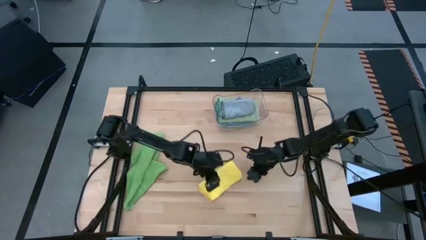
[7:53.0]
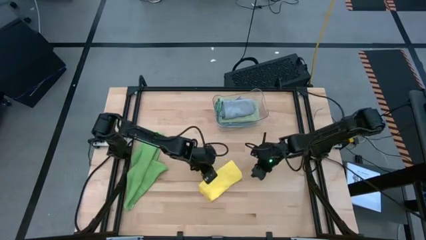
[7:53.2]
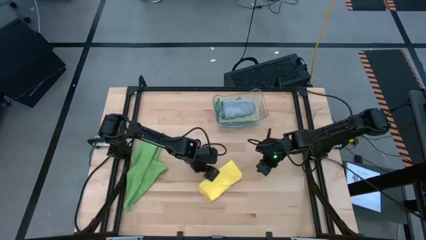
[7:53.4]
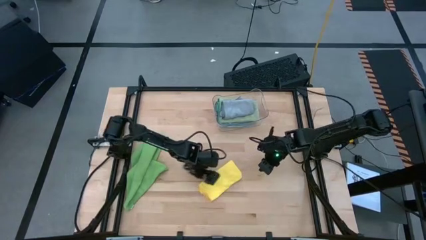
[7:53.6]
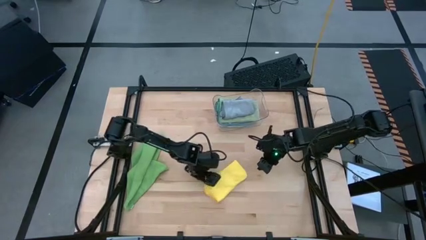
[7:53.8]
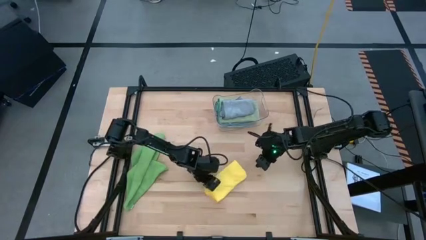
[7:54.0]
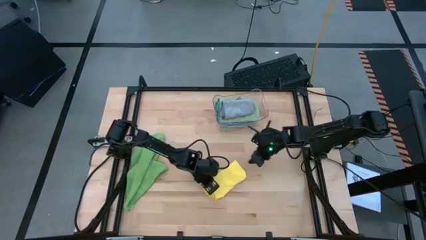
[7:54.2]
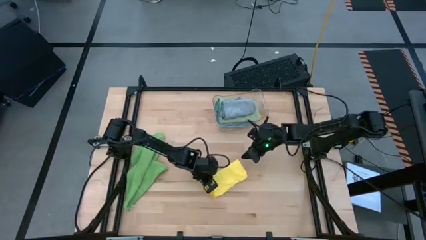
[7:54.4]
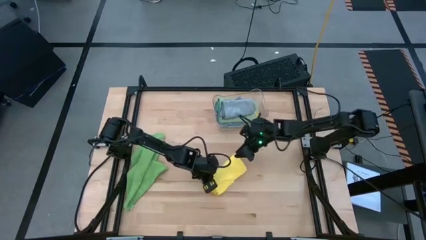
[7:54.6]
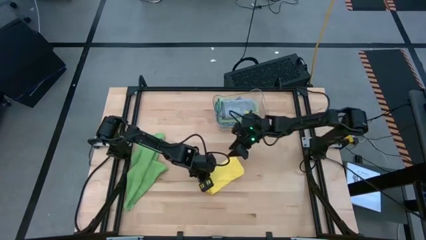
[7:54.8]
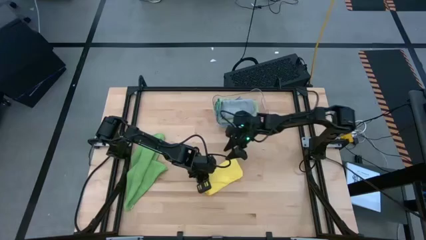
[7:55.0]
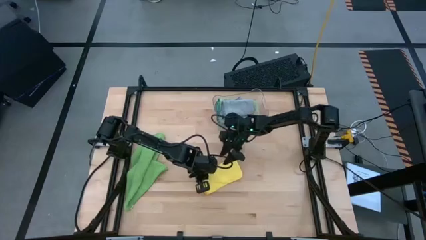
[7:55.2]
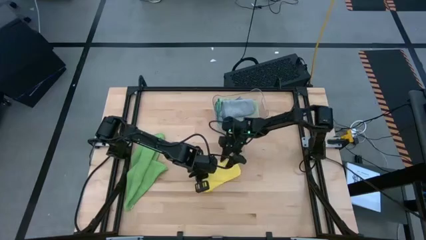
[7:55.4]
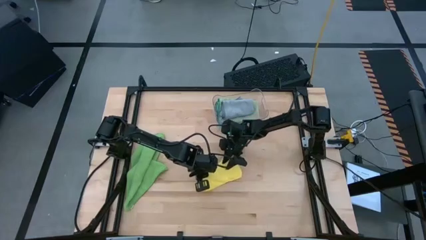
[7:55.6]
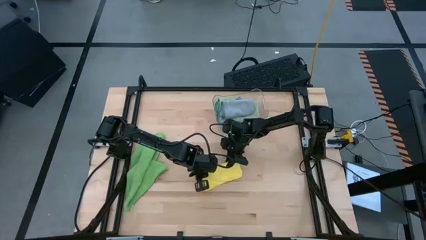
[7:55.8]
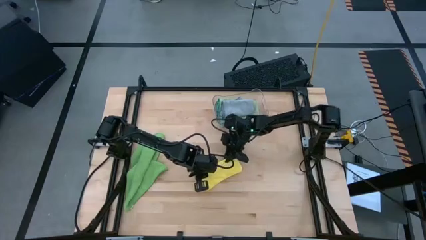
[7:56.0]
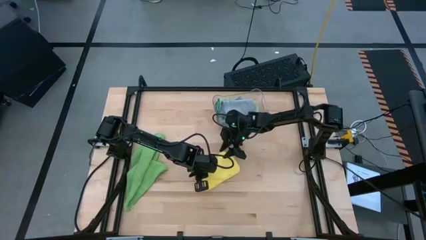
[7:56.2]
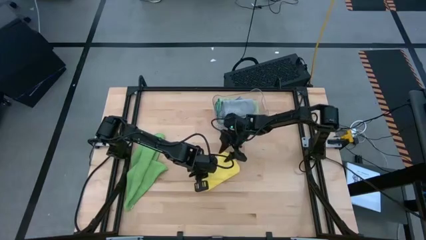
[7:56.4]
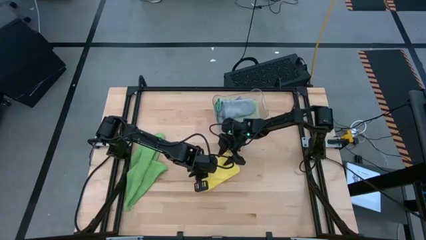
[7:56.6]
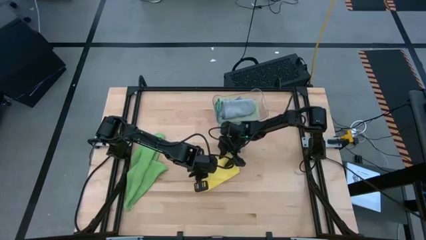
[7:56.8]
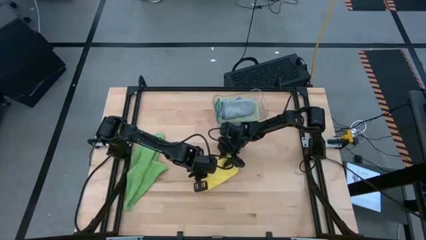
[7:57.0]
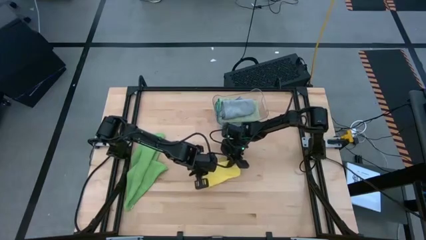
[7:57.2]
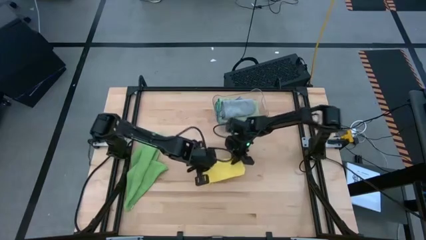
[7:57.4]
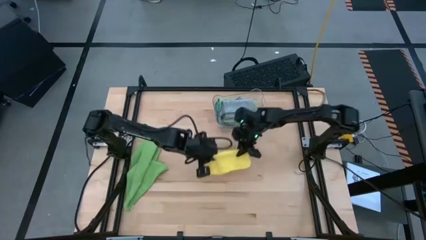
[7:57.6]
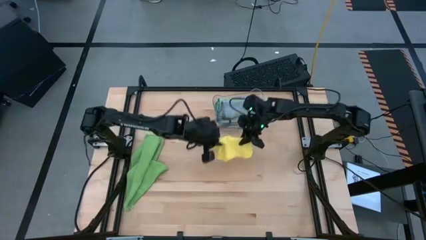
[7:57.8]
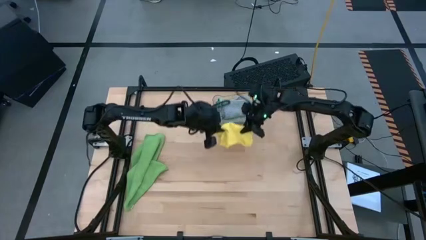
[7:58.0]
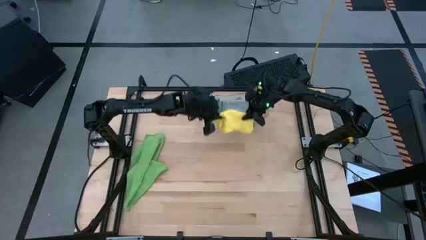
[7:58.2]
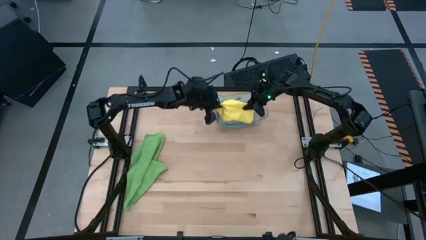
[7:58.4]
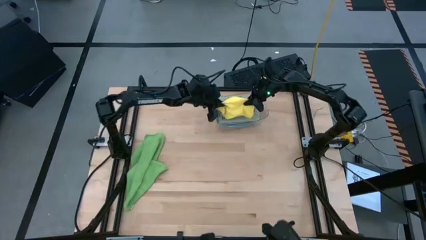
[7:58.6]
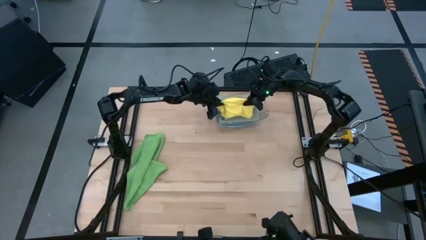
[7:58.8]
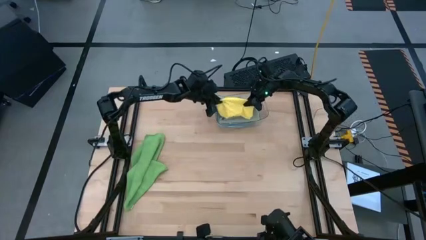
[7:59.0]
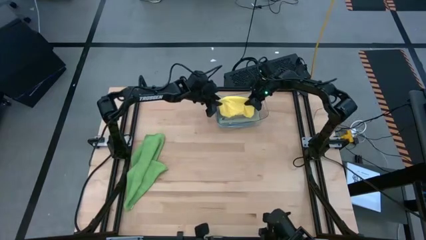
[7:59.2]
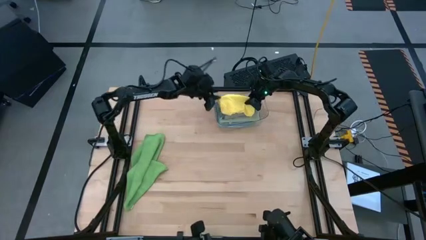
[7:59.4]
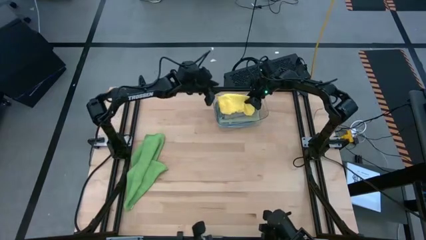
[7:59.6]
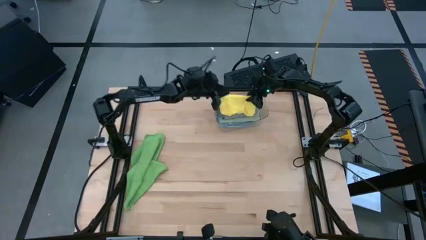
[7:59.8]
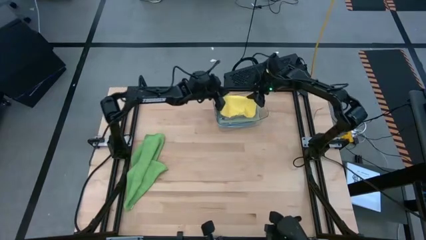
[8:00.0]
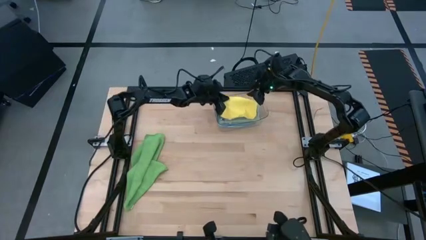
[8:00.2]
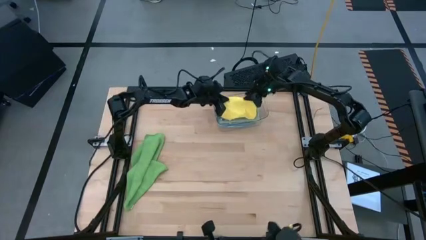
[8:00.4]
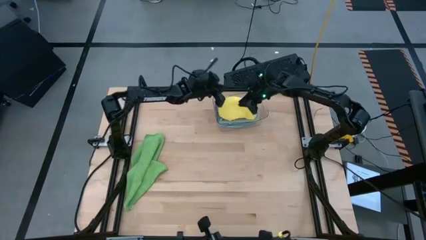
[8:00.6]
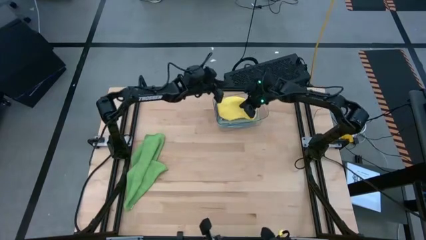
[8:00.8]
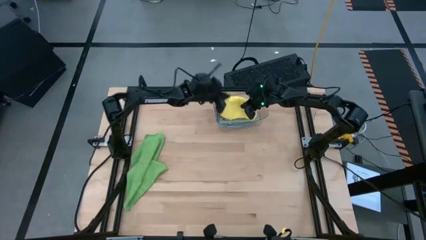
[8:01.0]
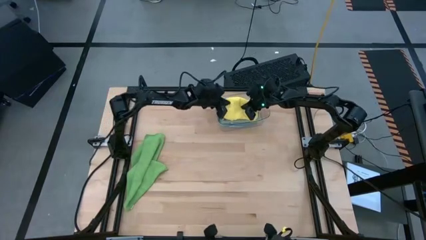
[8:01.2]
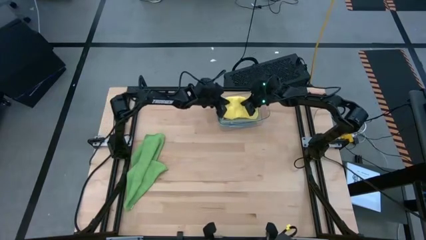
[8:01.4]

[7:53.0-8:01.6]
Task: Fold microfiber towels
Put the yellow towel in the transparent bin

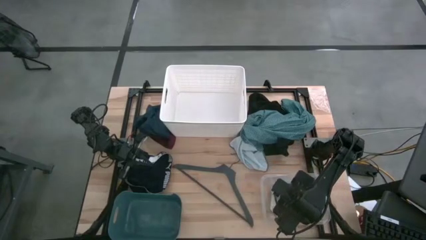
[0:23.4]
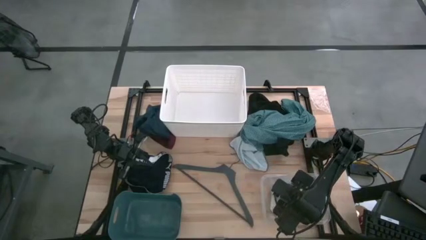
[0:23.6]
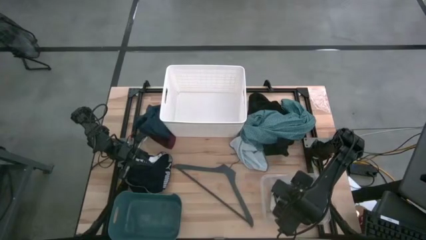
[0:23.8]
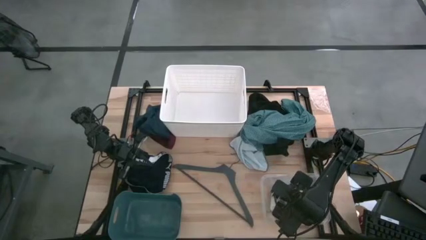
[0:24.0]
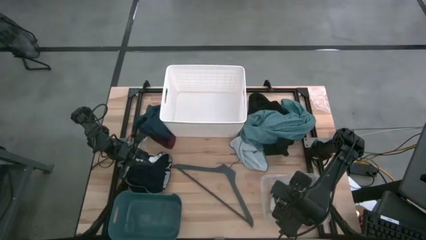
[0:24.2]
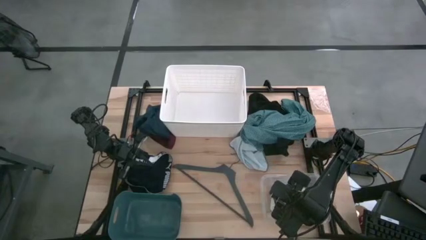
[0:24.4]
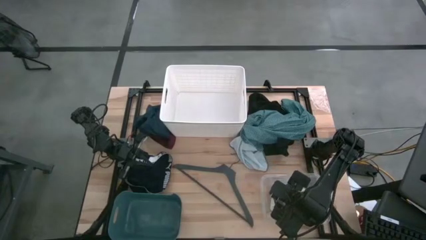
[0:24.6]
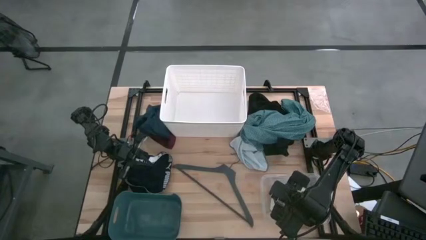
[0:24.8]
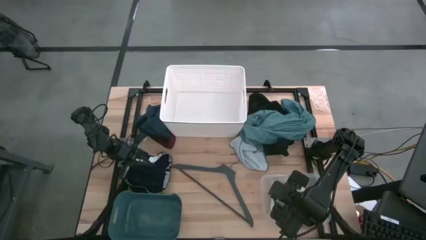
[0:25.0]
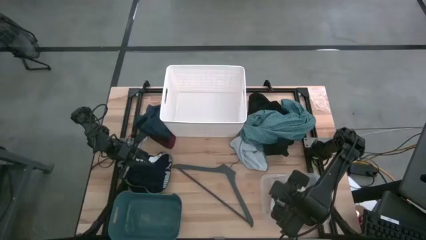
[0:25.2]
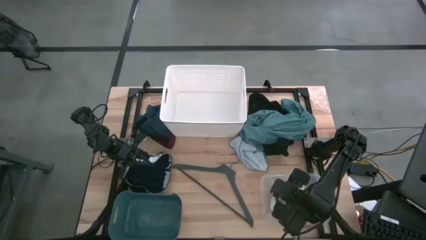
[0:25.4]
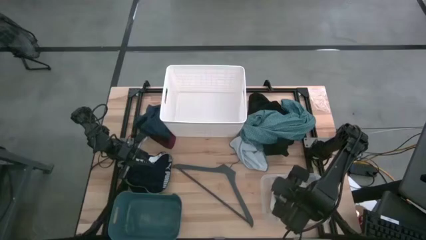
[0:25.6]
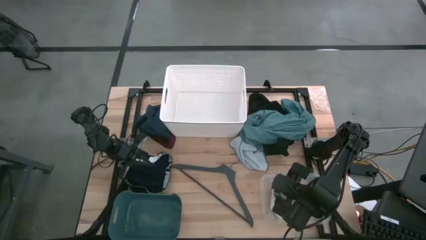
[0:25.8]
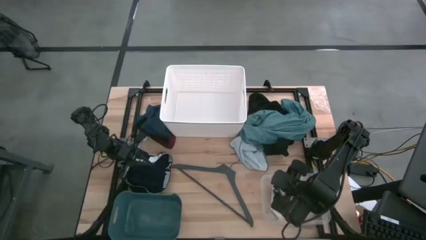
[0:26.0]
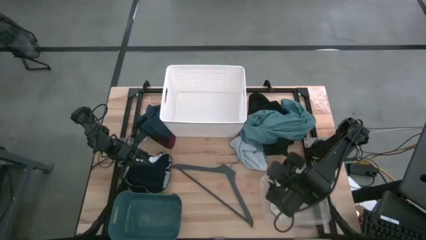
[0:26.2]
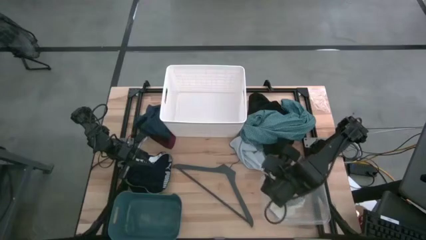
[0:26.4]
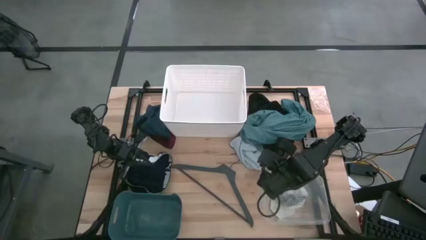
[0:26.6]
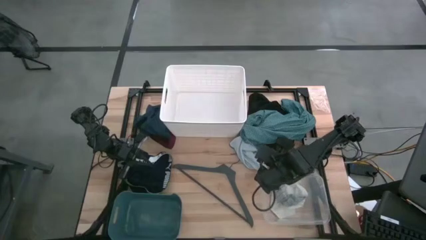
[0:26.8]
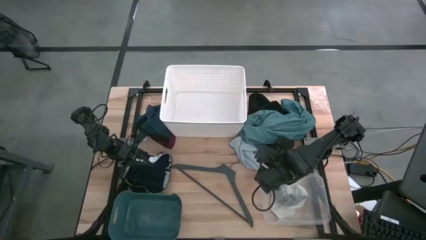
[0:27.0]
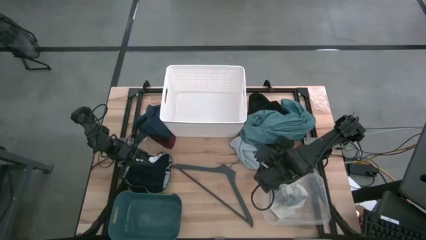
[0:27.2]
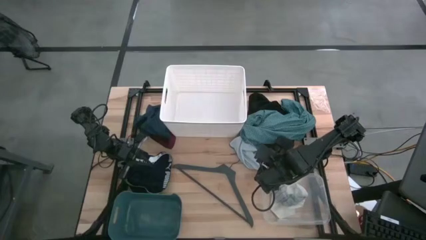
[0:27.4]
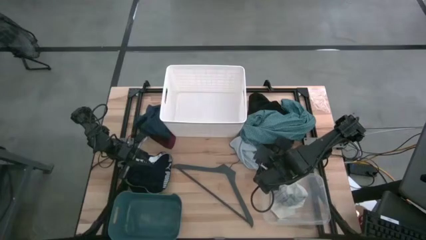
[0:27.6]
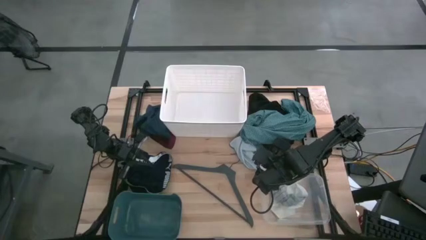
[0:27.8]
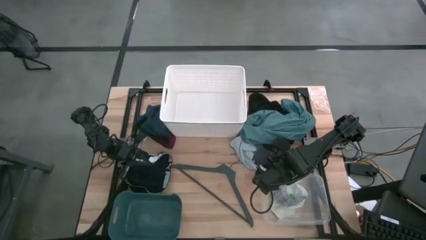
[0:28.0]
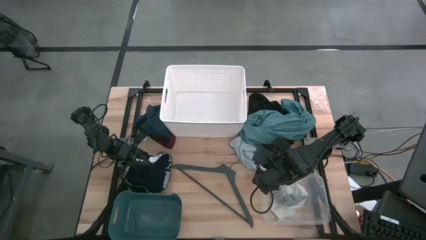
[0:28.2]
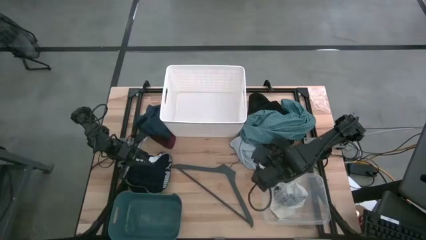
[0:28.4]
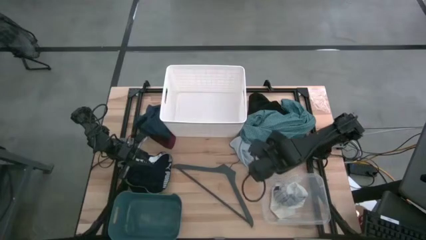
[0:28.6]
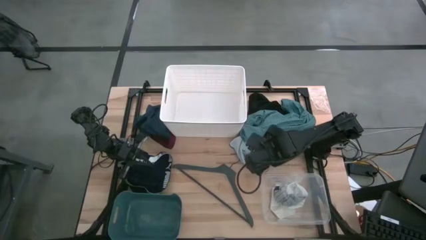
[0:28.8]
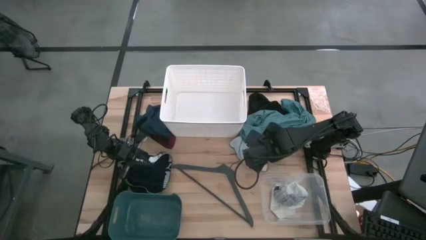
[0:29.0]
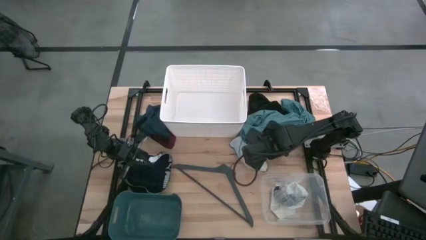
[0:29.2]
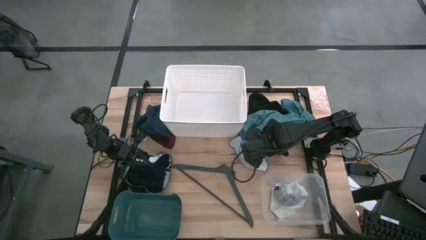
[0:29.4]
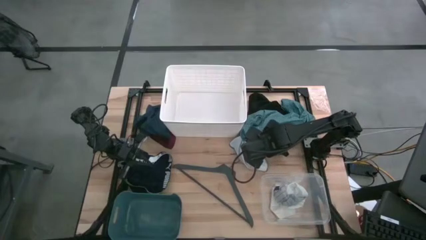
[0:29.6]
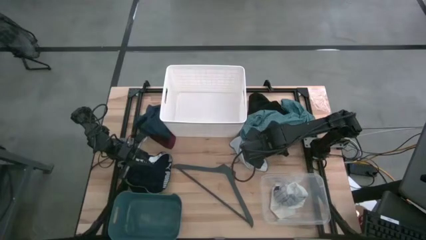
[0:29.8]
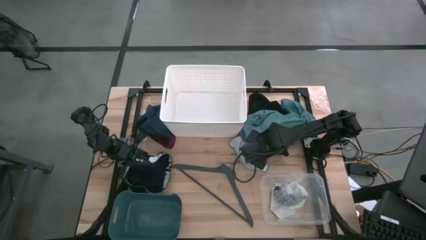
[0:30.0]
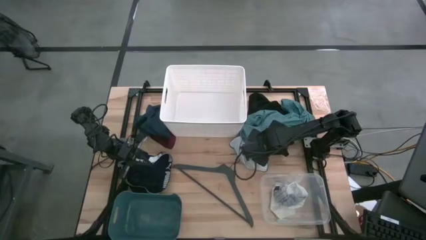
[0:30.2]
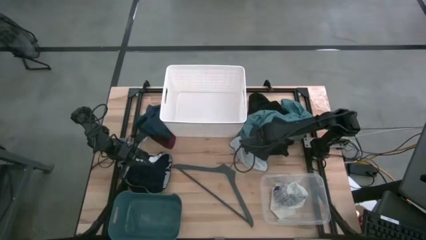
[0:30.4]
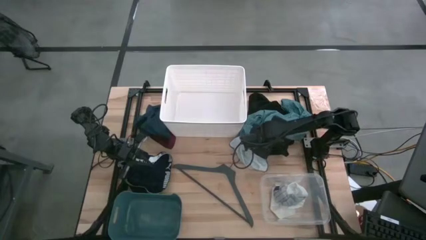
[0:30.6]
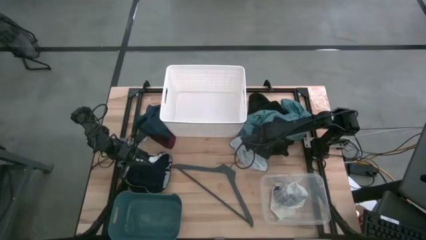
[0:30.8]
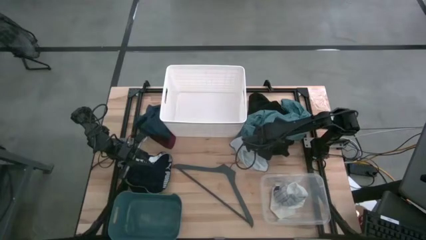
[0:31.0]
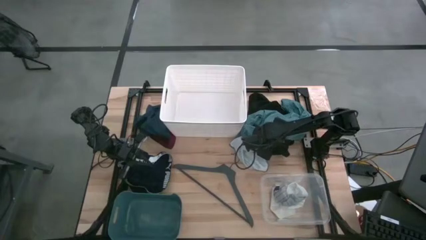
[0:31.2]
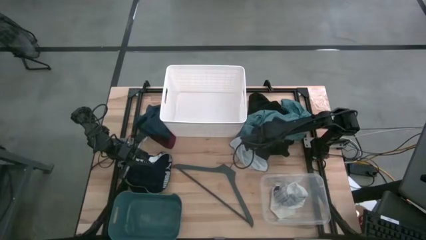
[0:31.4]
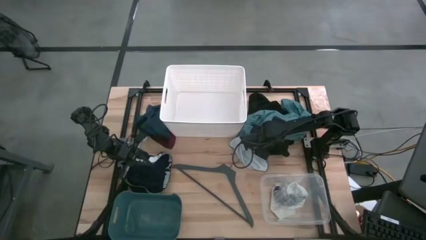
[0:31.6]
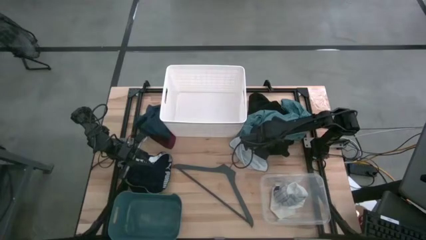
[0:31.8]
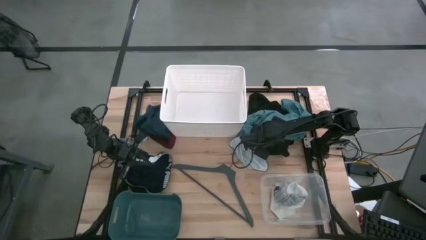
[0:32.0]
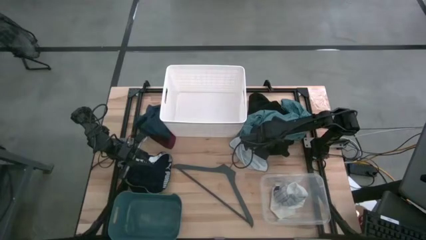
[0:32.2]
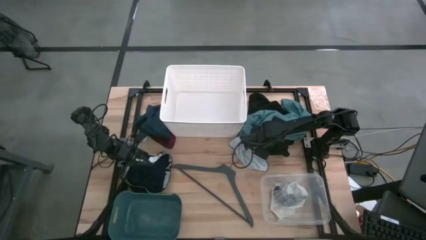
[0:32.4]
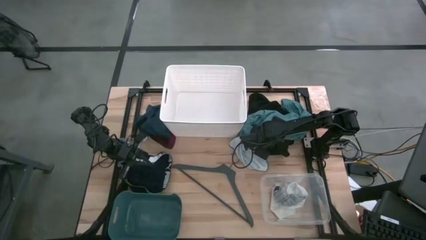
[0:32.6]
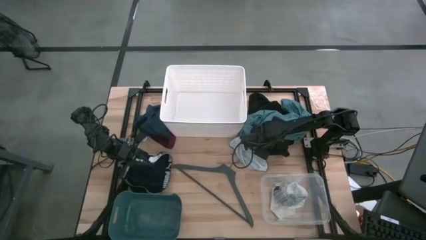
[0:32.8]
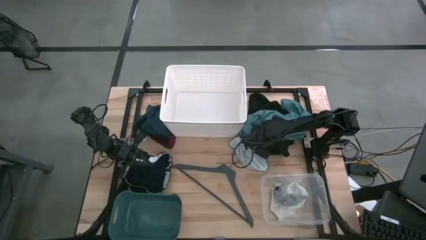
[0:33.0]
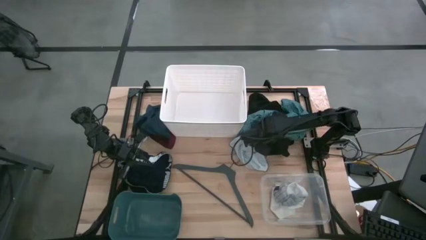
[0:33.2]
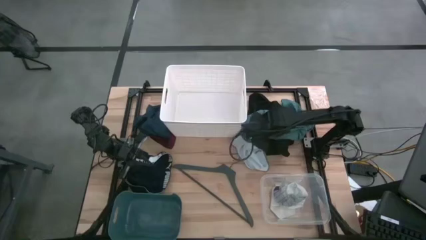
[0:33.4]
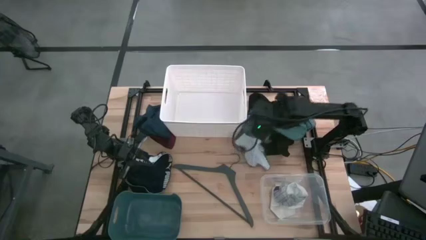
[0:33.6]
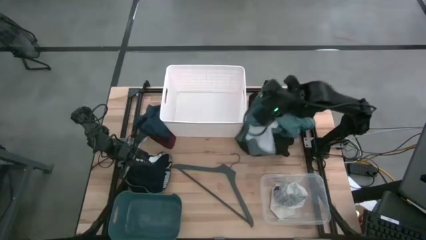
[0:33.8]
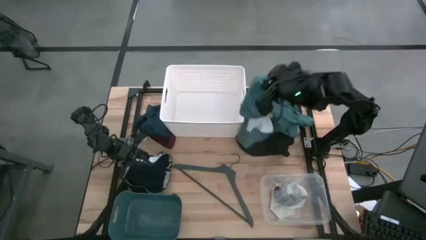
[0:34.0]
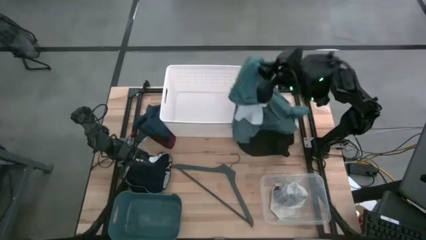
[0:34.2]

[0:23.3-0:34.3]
Task: Pick & Place Cloths
Put the light green polo shirt into the white laundry bin
